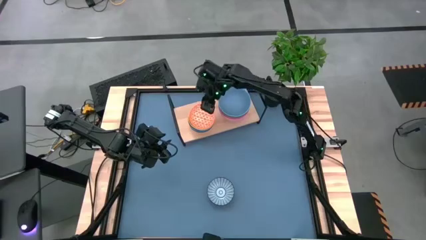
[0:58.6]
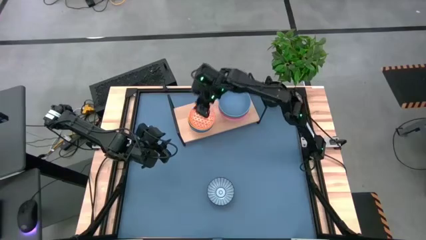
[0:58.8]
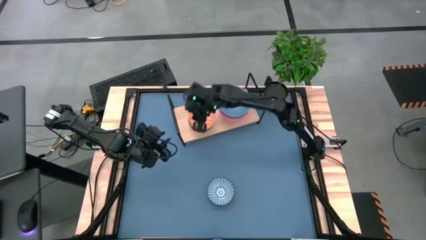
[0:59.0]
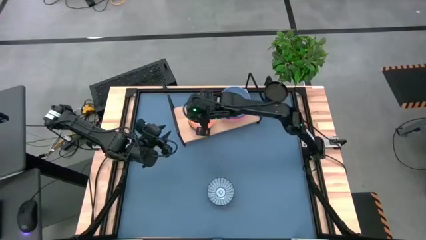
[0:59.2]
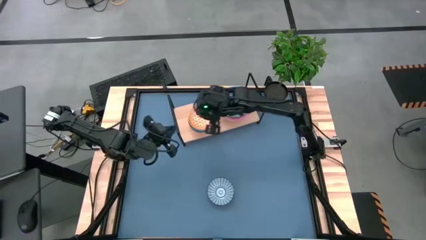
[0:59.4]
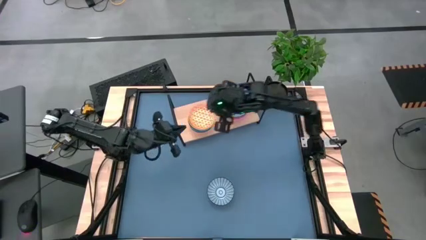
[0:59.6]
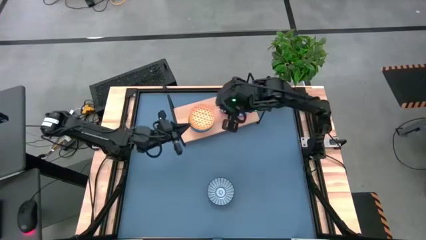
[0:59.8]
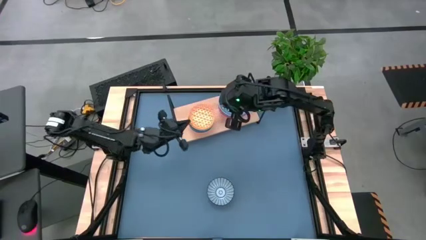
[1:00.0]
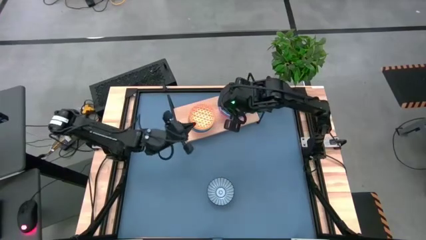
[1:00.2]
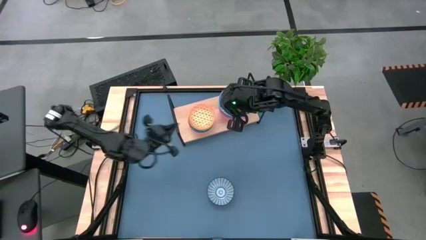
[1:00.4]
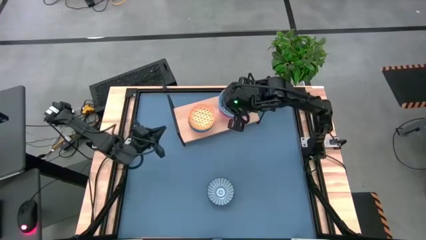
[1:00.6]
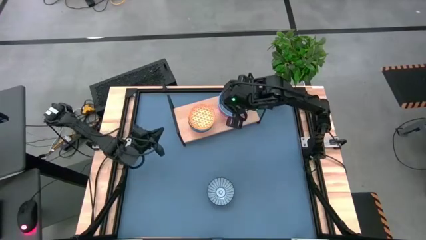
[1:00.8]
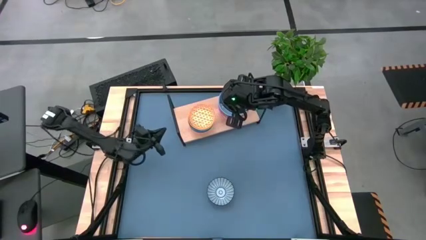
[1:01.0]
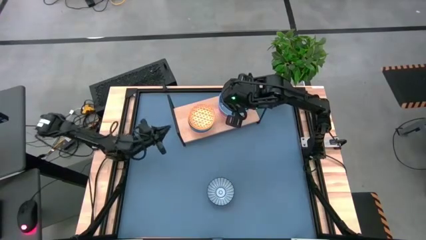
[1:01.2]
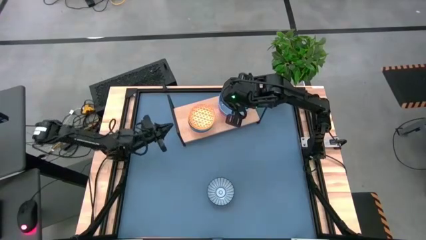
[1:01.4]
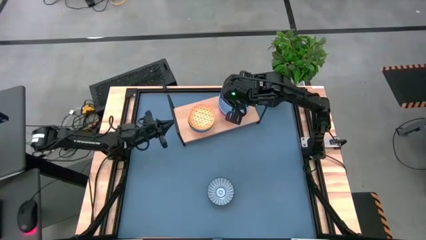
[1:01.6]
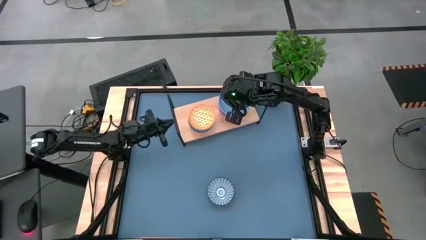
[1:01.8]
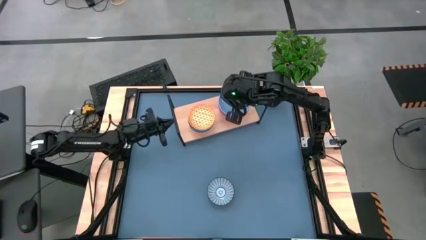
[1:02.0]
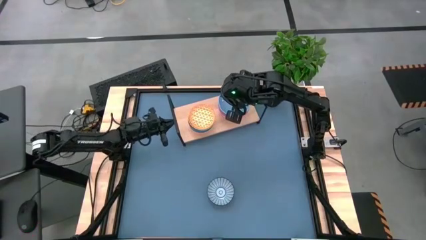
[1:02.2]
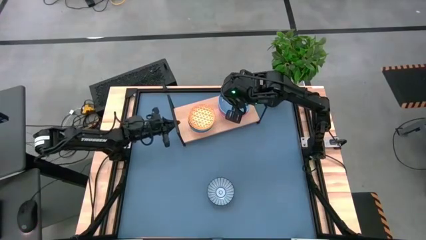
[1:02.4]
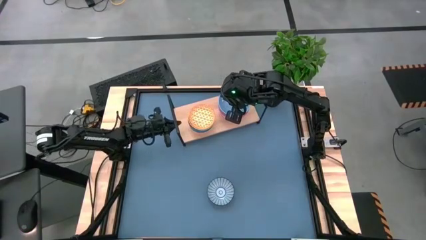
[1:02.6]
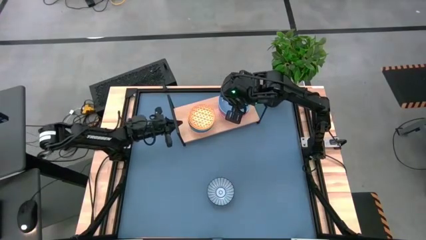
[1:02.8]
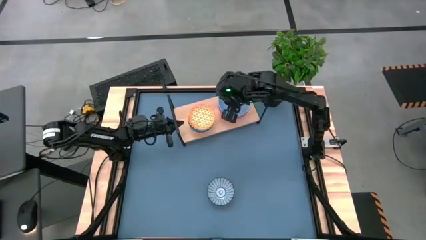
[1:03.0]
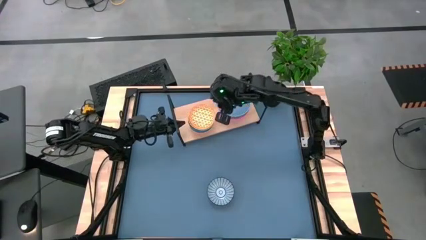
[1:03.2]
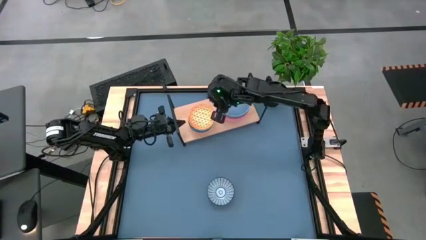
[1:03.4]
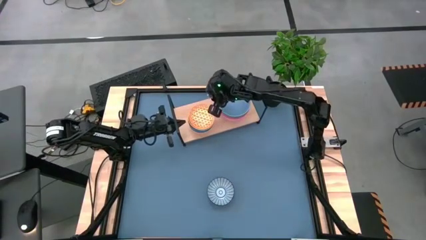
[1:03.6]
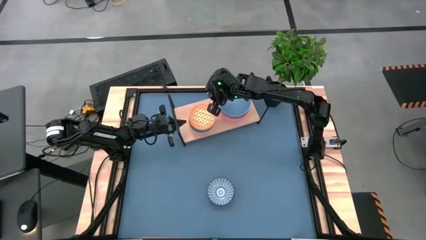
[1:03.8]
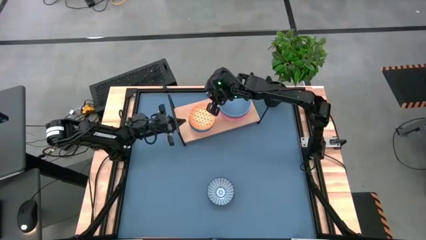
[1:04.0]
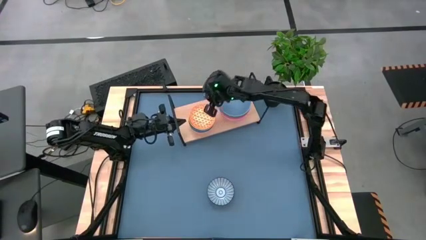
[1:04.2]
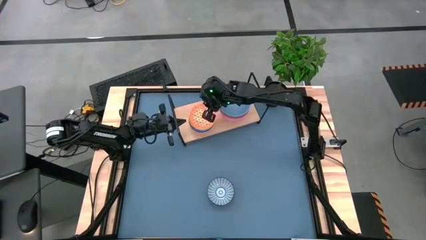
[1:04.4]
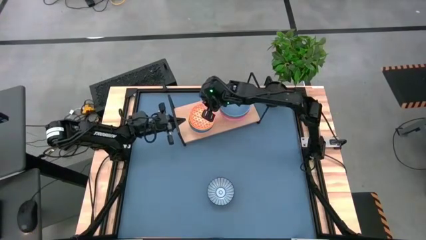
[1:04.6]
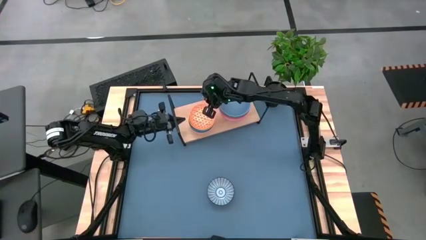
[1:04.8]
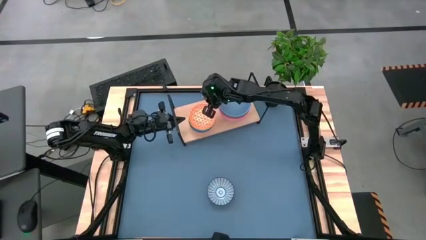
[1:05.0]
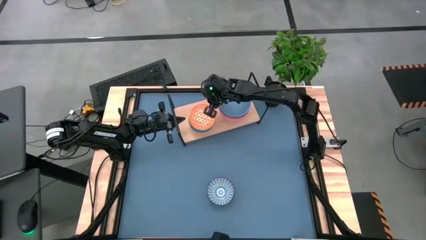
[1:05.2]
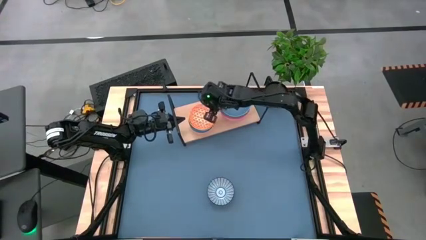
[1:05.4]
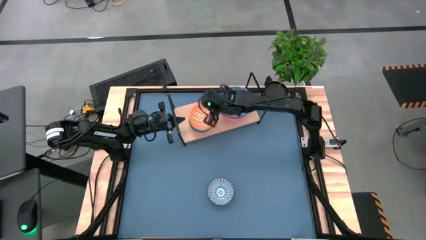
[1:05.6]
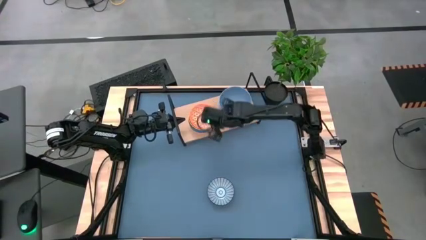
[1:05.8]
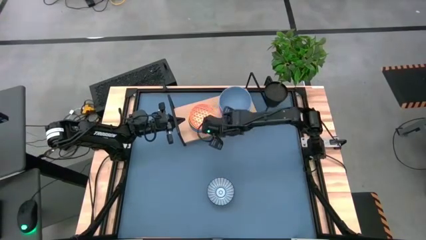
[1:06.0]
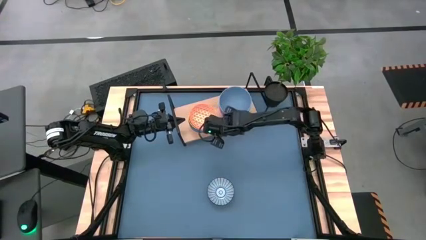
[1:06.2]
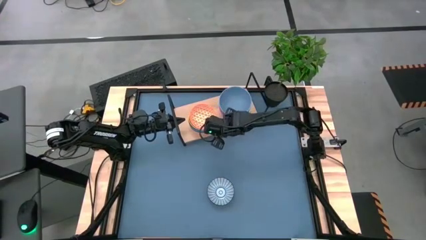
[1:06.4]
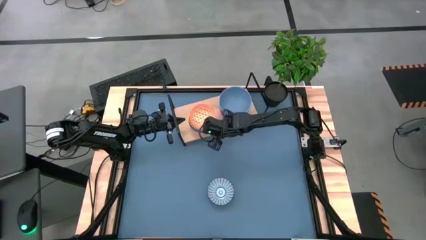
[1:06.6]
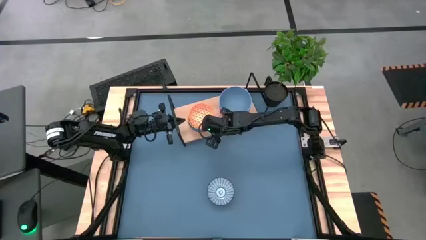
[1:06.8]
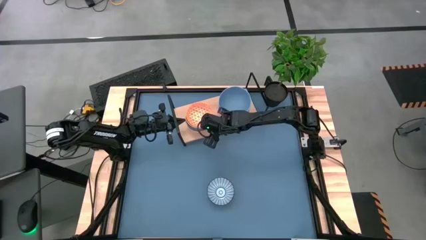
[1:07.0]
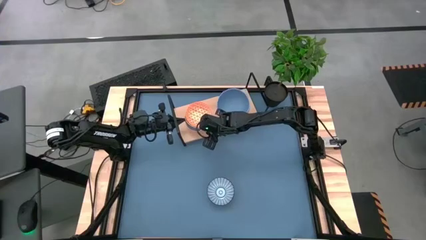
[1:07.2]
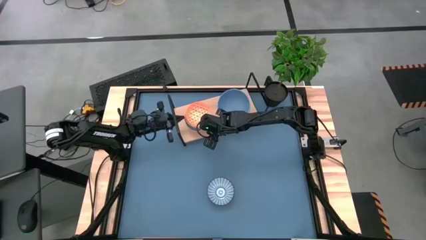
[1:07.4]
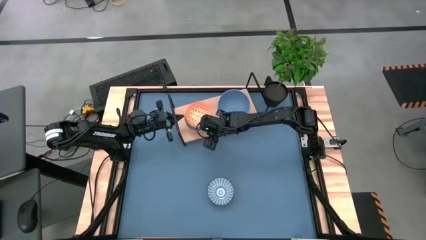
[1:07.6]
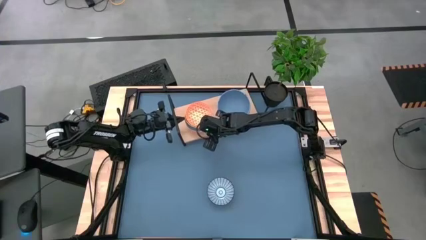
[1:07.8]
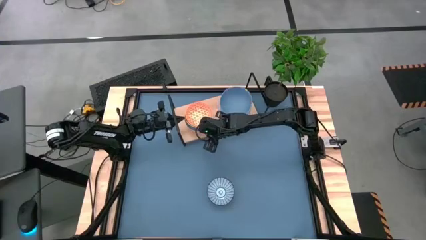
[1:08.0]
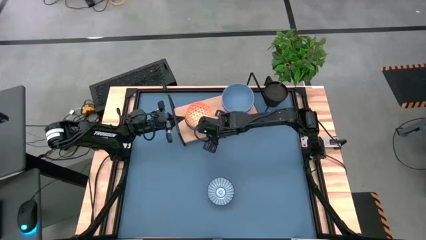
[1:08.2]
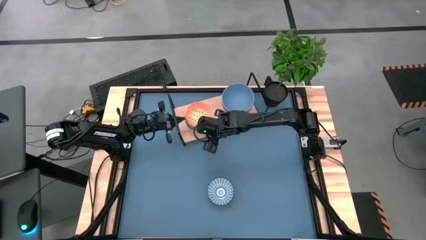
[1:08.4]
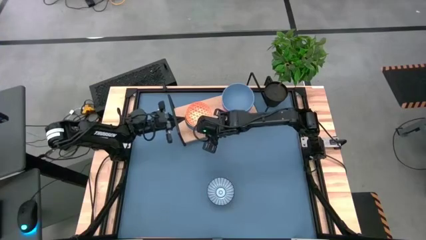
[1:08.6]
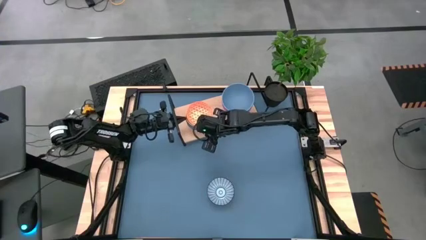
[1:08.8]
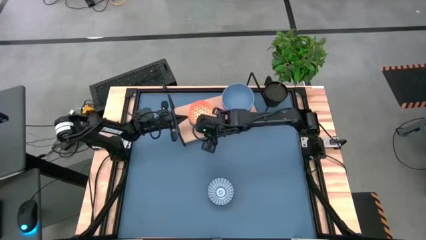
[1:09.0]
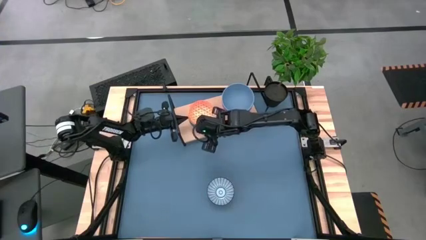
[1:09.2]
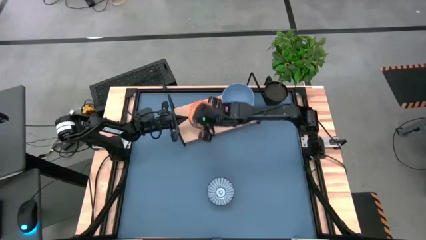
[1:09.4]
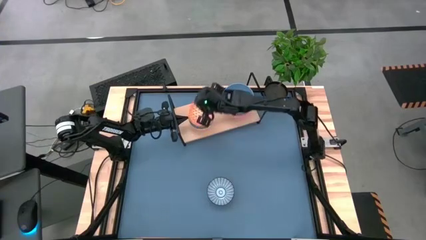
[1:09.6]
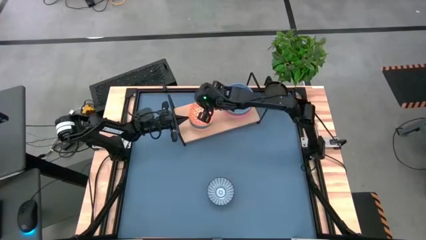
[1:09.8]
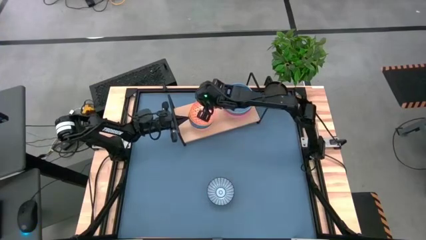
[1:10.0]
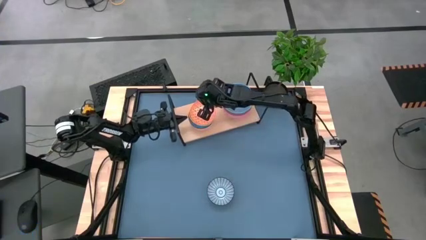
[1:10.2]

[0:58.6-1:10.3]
Task: Place and stack bowls onto a shelf
Adjust the stacked colored bowls

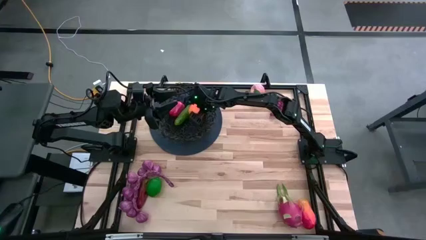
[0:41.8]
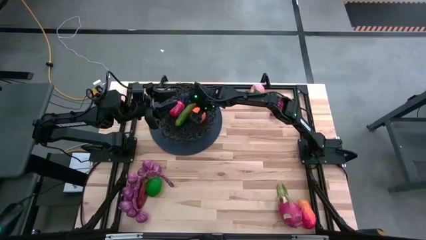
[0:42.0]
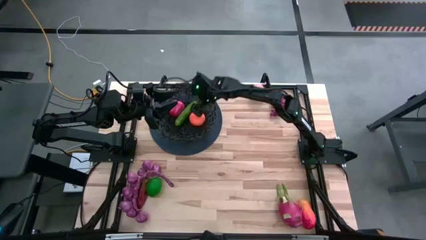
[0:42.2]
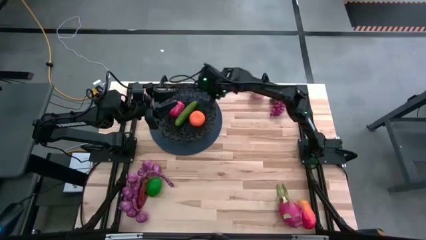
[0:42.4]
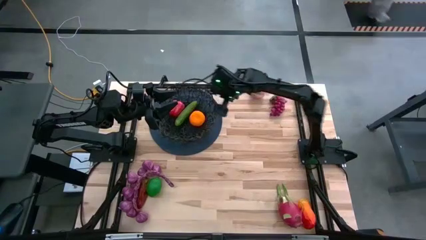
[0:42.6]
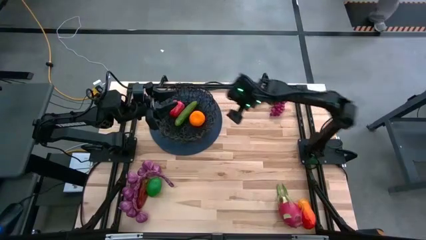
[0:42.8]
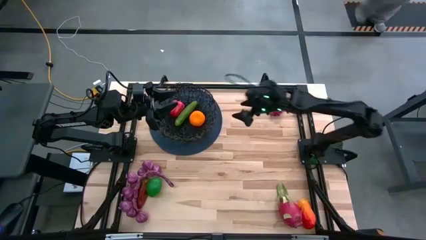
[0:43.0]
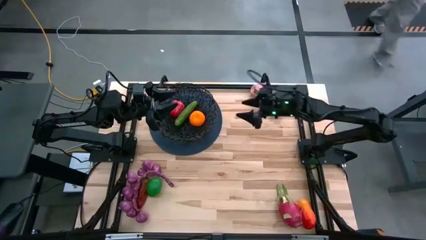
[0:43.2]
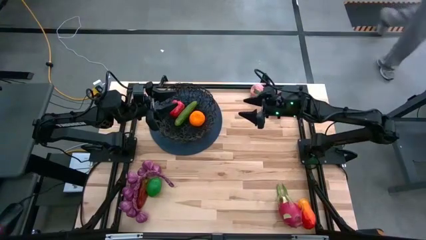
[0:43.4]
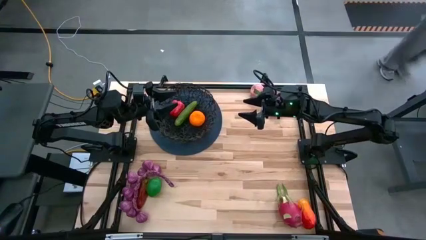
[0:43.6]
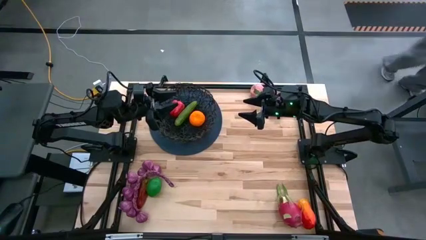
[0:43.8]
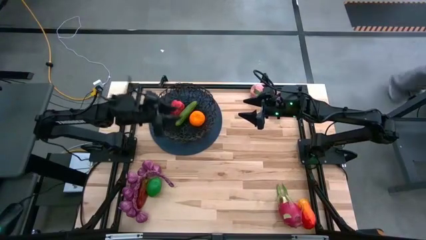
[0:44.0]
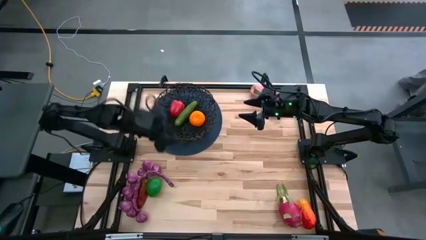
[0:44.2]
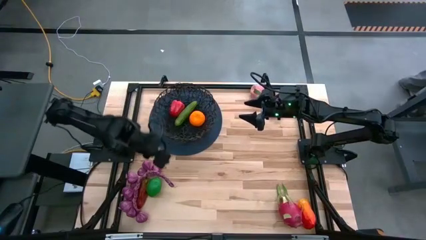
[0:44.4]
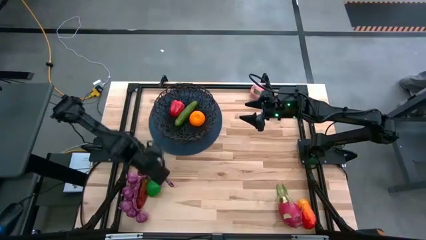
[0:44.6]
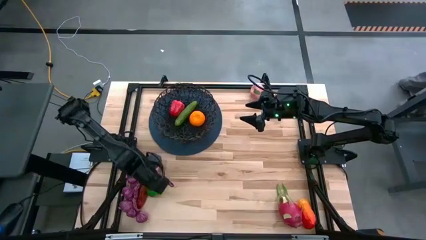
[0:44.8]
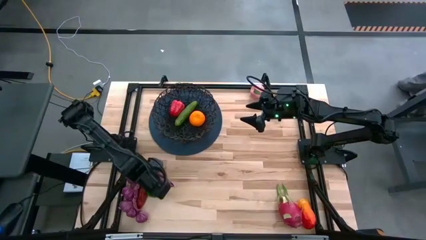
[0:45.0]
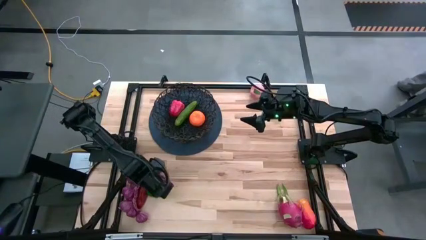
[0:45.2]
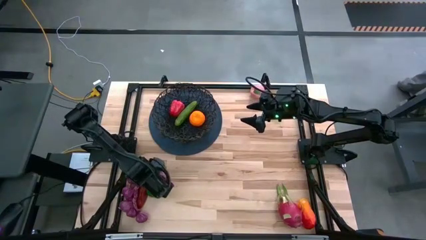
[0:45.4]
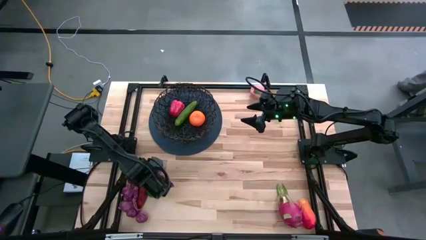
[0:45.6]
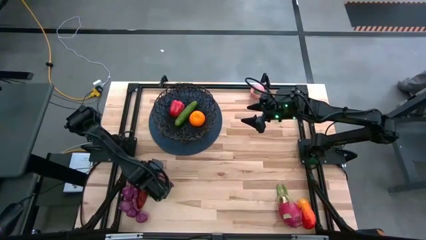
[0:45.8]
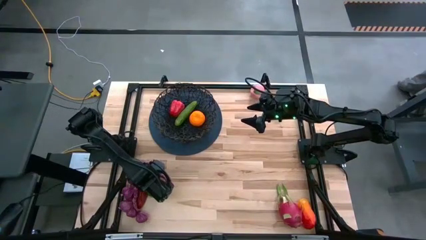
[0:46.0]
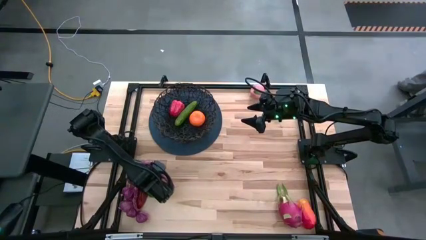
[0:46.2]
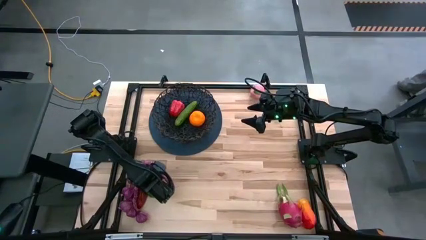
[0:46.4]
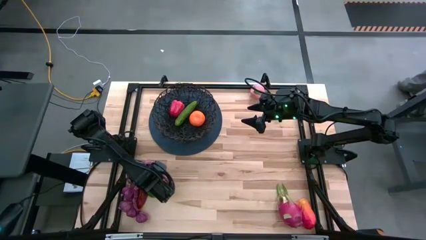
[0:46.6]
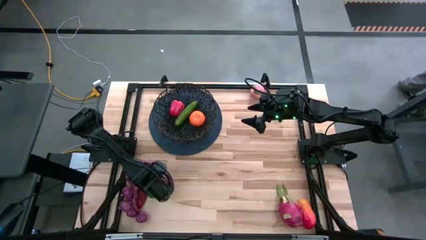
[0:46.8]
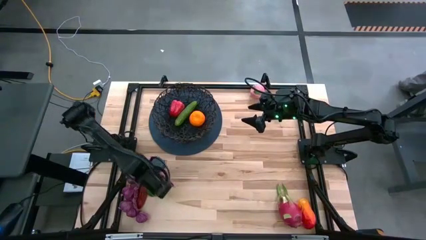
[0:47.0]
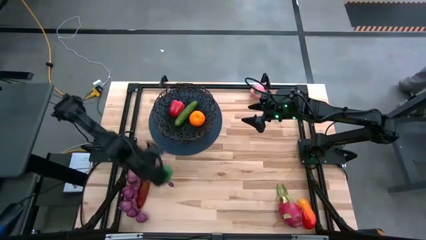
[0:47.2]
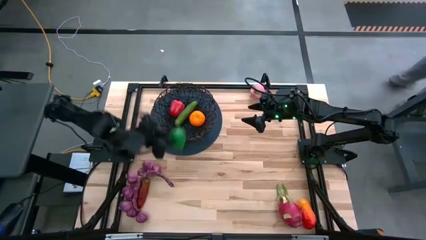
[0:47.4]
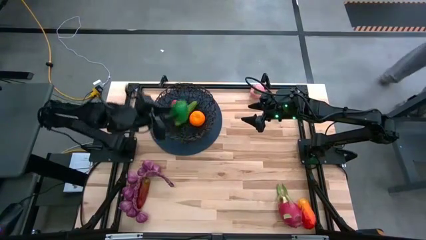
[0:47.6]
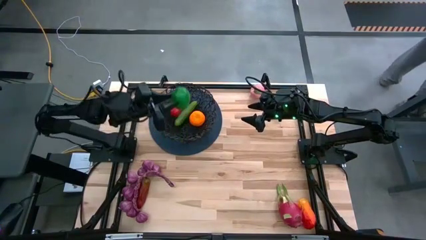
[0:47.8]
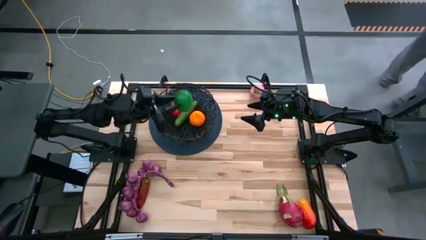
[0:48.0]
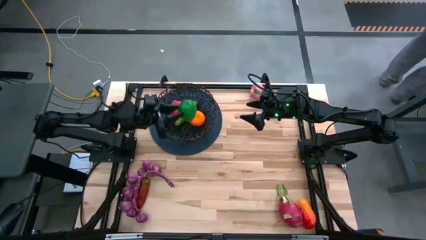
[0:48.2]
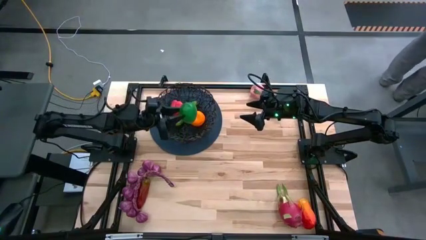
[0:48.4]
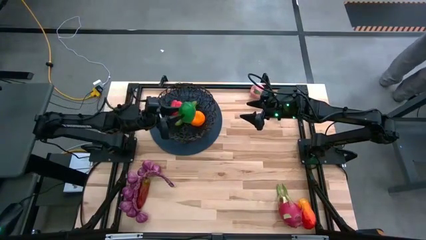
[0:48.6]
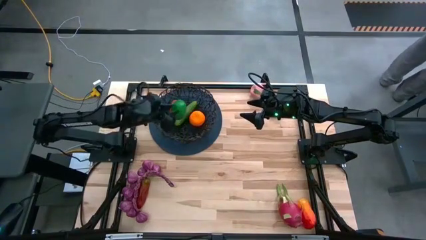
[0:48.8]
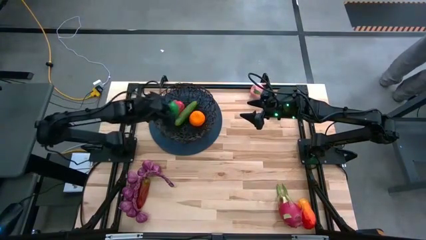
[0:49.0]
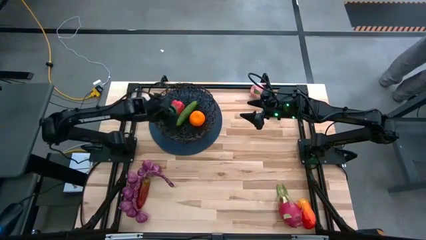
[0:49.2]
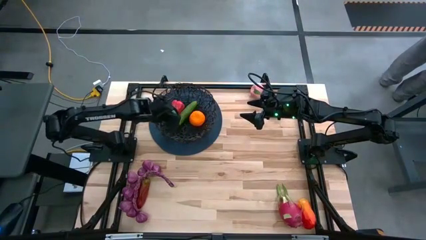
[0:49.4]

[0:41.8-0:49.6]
Task: Build produce basket
Put the green lime into the black wire basket
